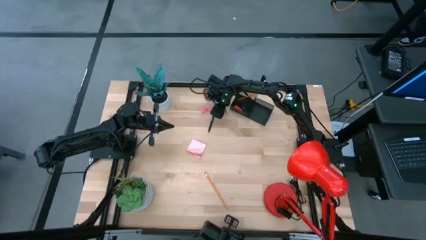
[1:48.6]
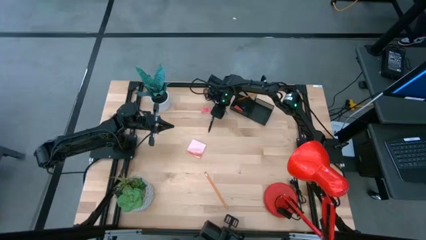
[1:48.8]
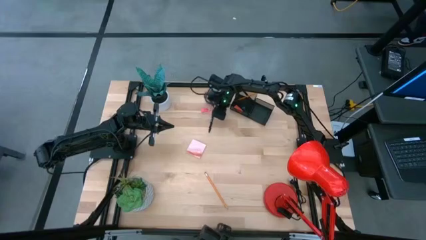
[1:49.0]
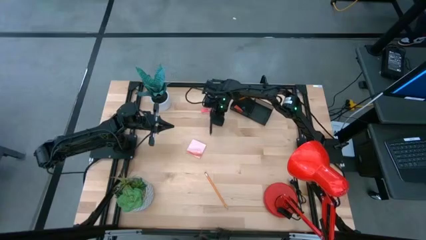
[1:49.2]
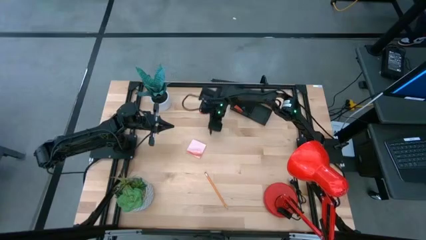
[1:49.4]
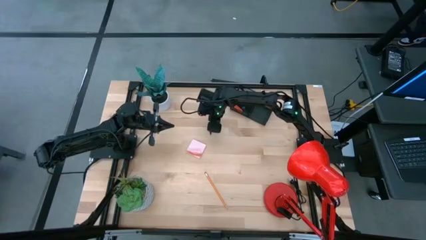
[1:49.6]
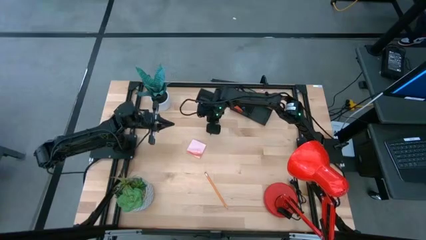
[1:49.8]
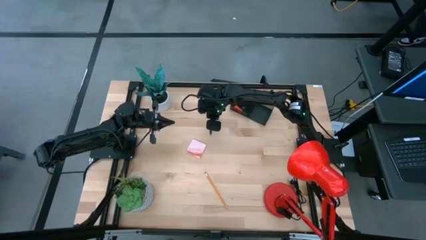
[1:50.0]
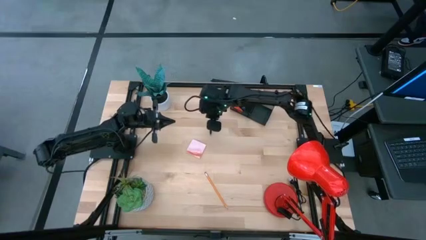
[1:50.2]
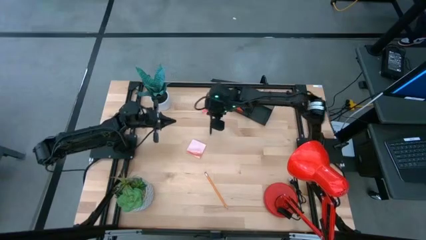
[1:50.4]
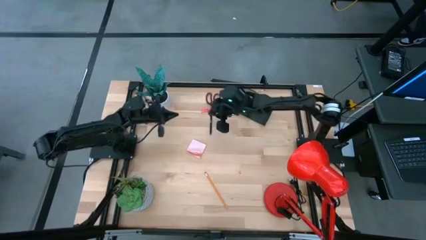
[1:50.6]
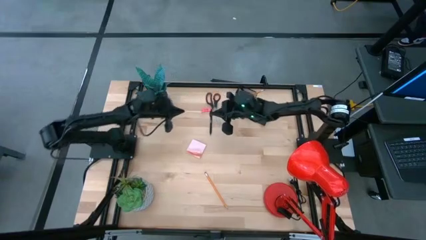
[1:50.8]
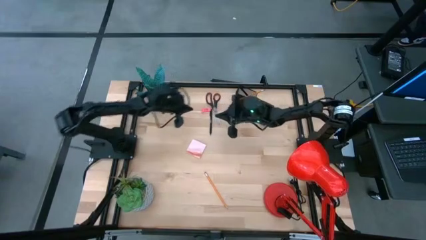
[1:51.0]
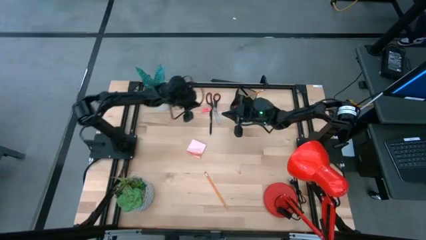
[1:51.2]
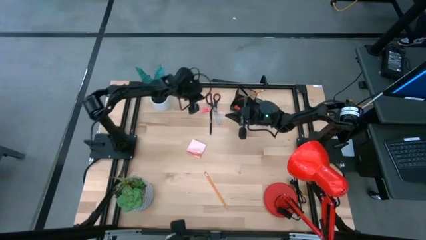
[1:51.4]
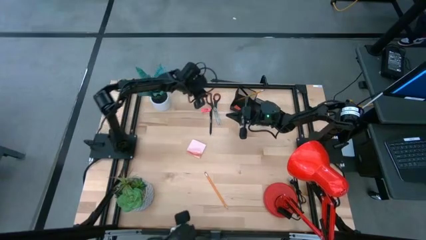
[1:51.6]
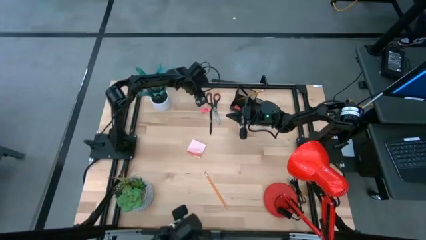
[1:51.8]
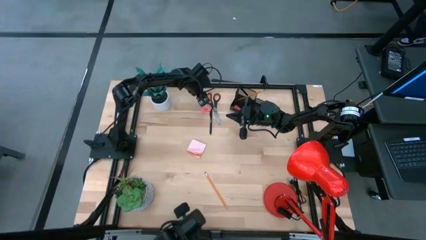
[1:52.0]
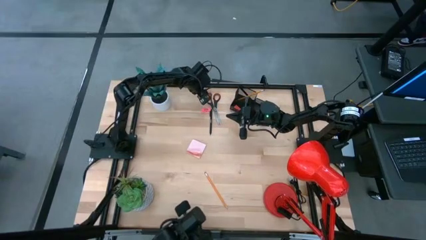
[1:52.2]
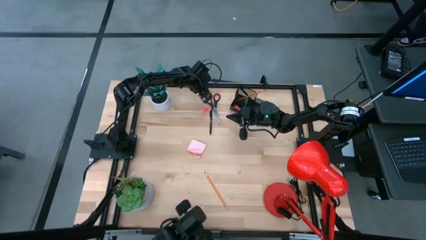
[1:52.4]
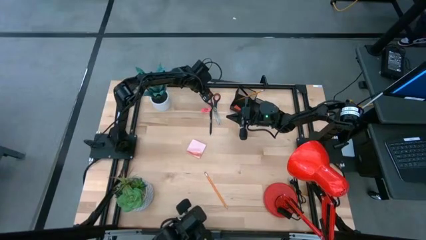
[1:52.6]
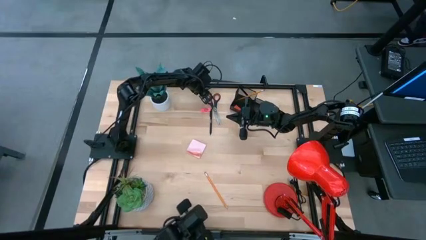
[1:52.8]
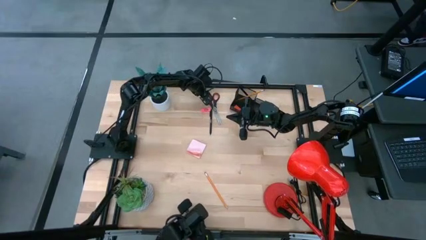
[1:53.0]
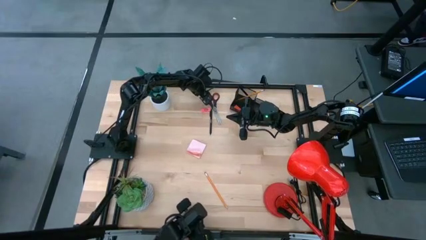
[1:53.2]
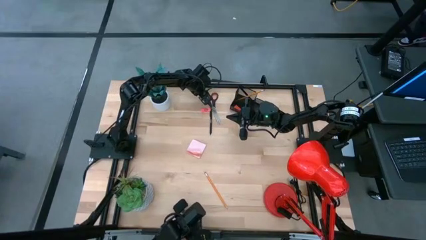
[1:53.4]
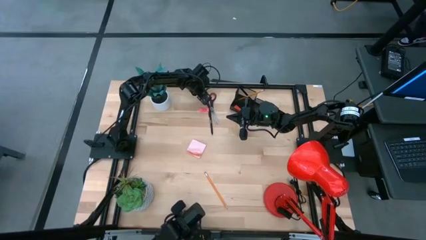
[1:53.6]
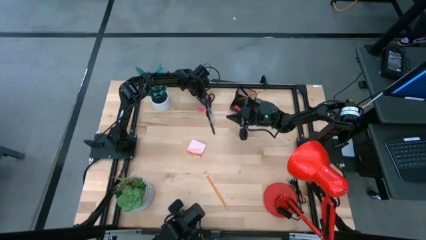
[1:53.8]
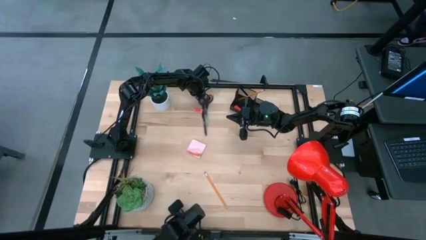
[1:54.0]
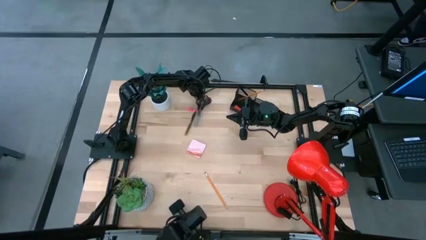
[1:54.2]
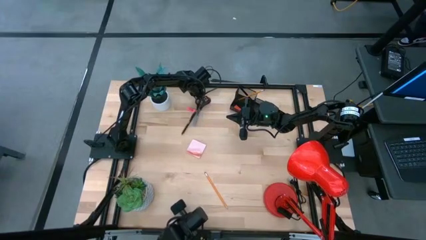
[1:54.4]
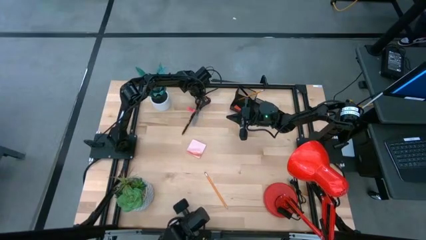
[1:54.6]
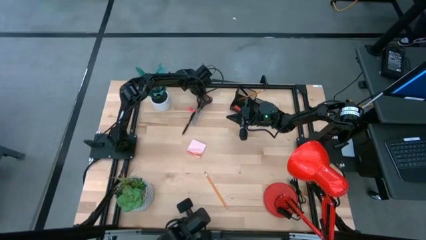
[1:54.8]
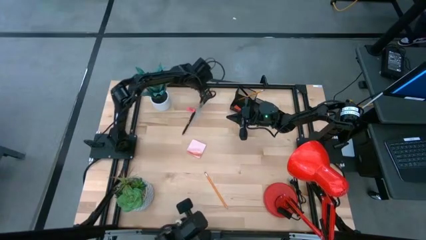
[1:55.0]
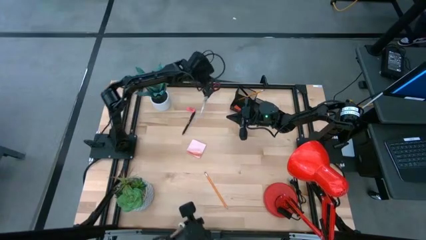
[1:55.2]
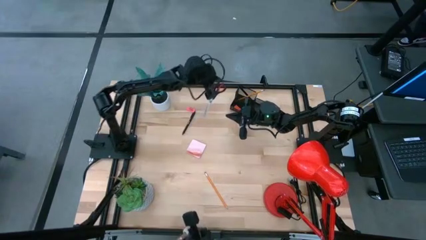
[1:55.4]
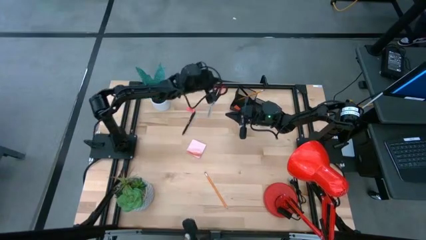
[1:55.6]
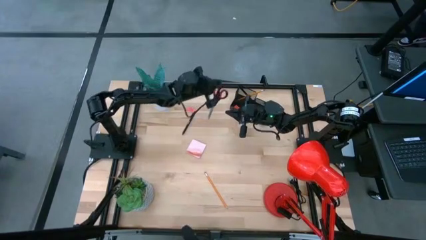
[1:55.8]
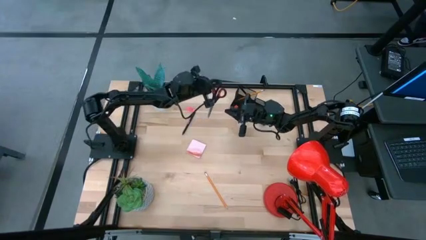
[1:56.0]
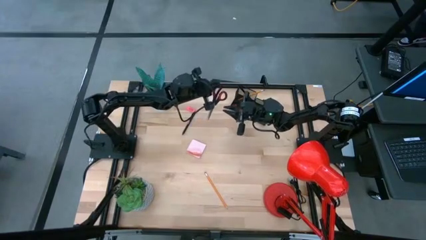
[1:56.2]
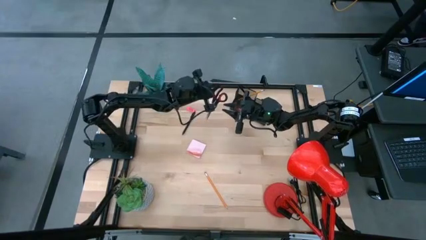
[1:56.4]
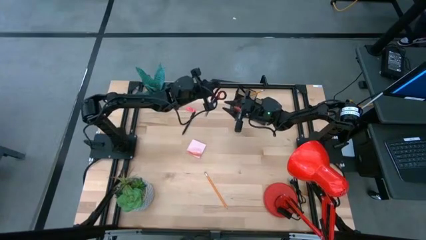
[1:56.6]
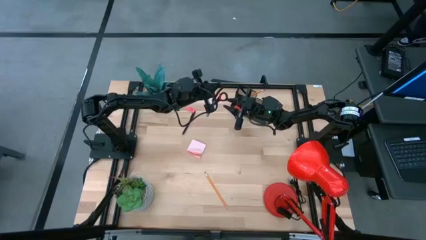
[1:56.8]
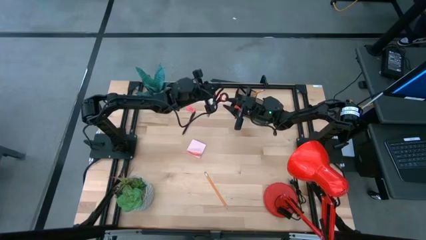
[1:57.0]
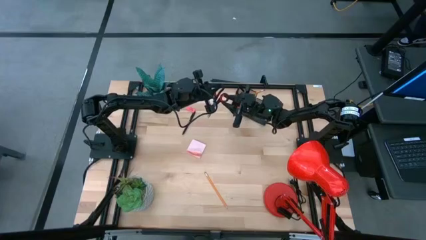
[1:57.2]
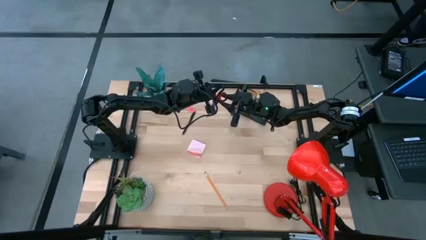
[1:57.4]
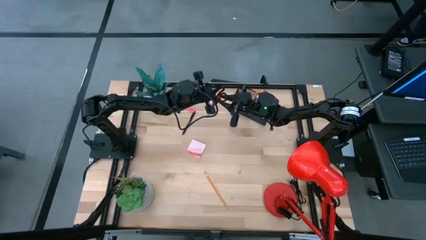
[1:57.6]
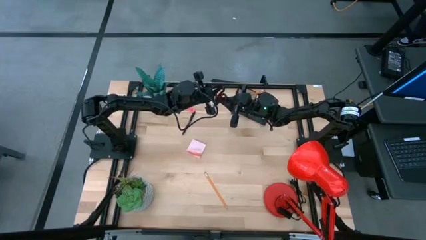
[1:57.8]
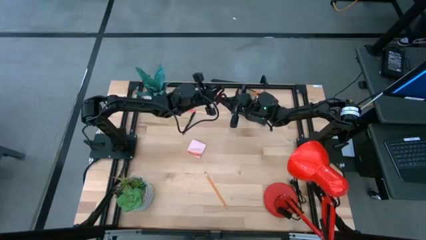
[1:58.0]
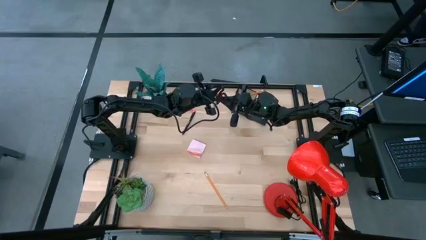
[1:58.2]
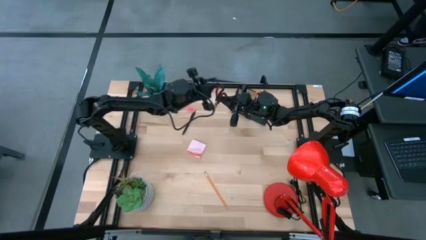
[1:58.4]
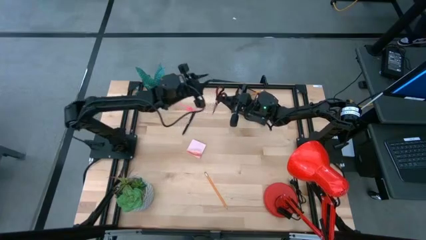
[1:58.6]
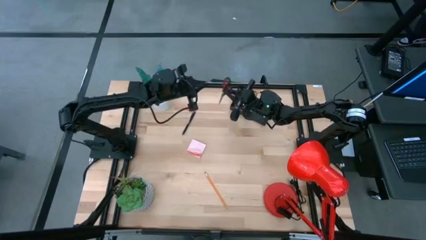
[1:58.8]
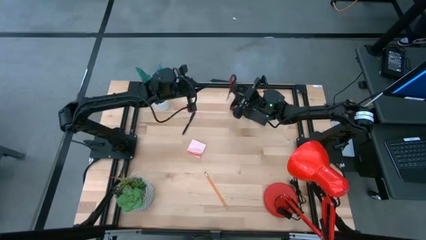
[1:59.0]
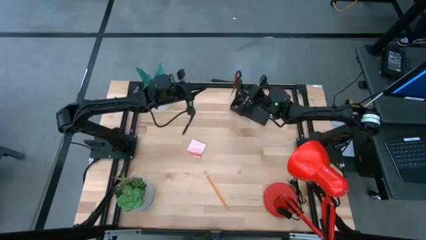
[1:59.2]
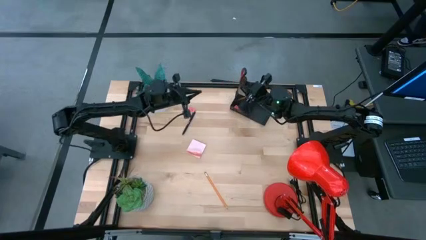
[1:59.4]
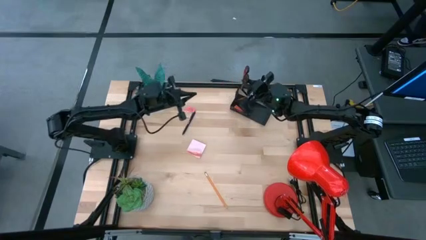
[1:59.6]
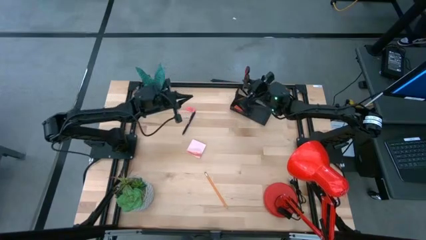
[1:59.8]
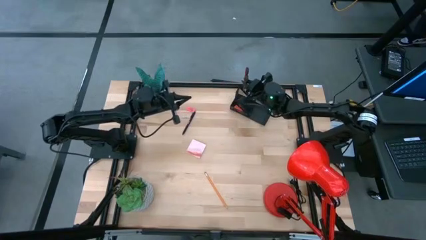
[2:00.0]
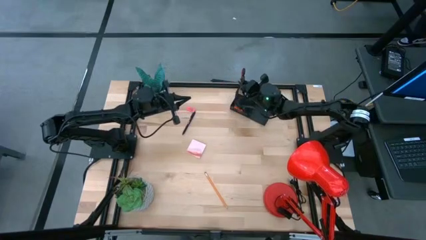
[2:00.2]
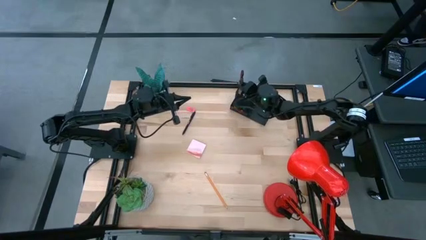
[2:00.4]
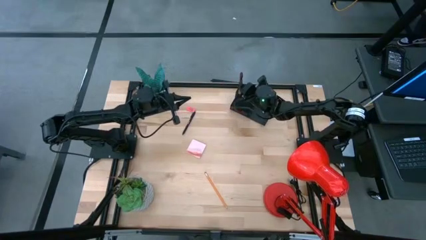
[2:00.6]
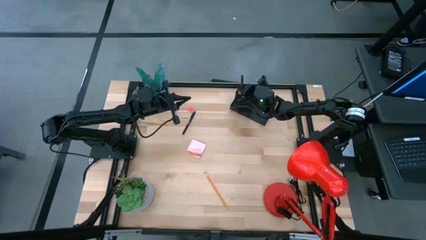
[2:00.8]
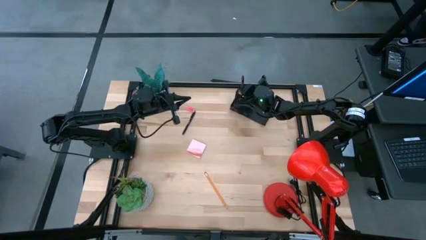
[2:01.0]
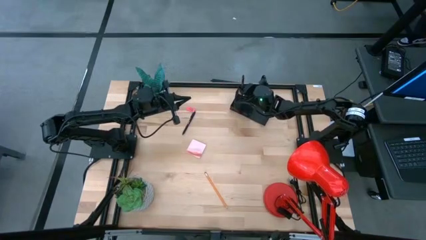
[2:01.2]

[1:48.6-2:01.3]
Task: Pick and place office supplies into organizer
Put the black scissors into the black desk organizer
